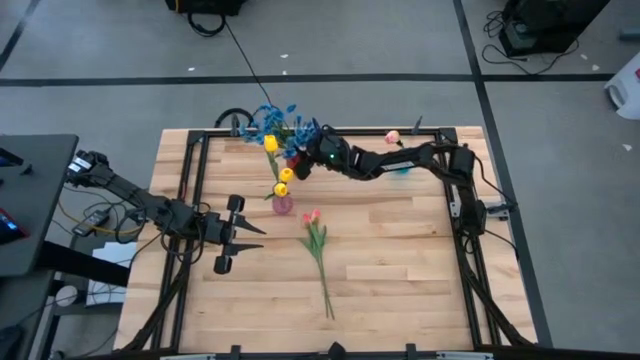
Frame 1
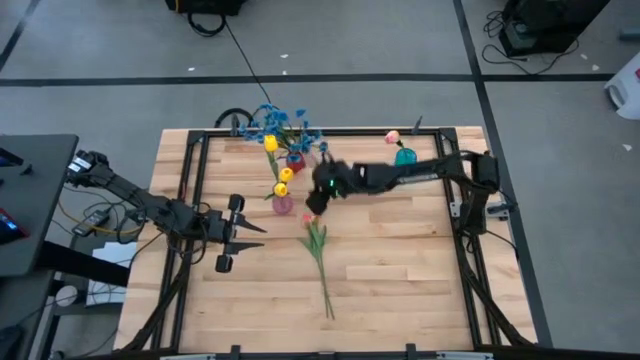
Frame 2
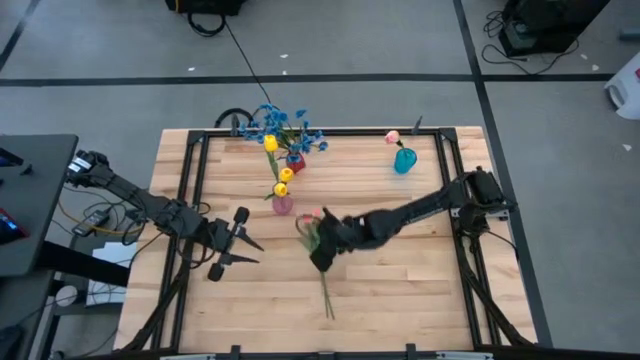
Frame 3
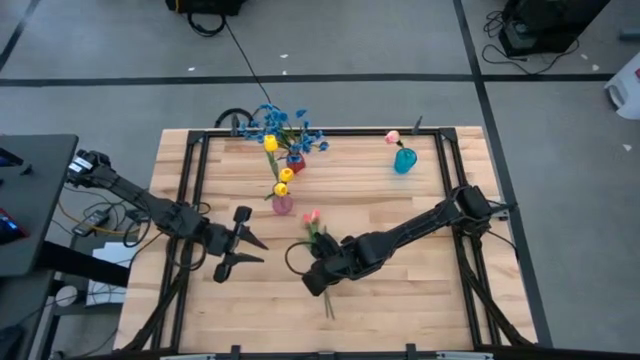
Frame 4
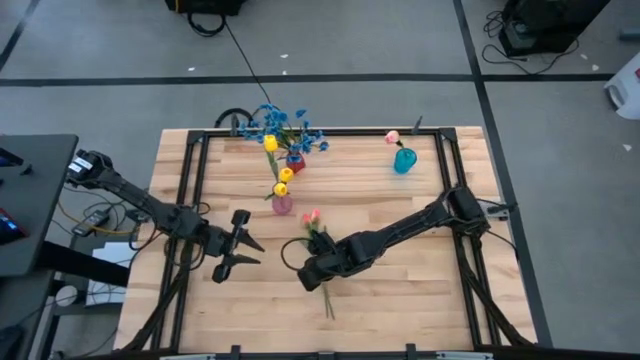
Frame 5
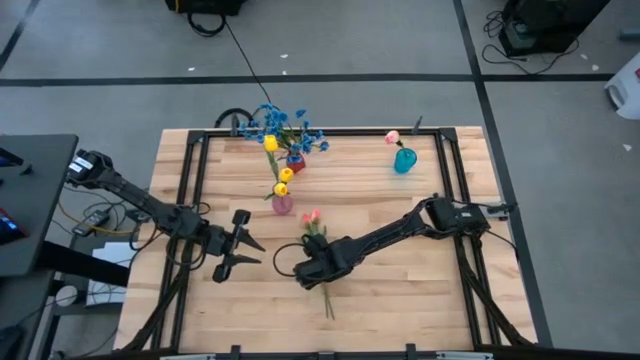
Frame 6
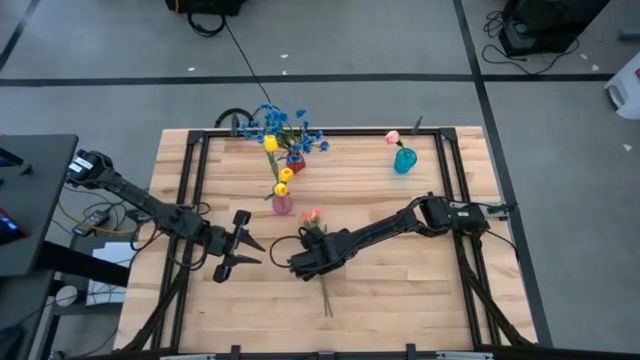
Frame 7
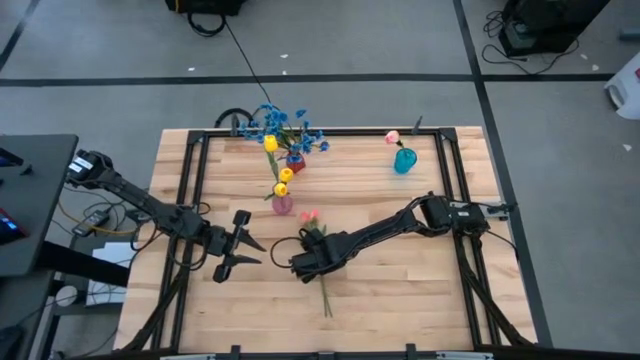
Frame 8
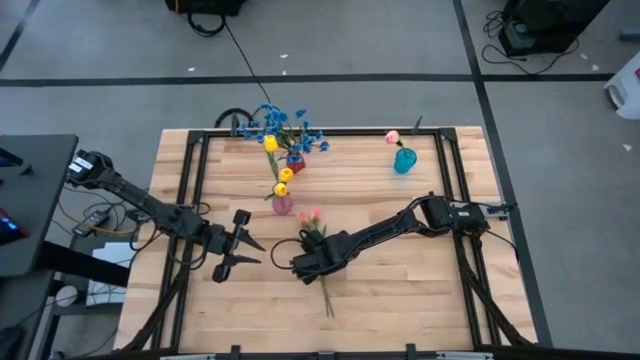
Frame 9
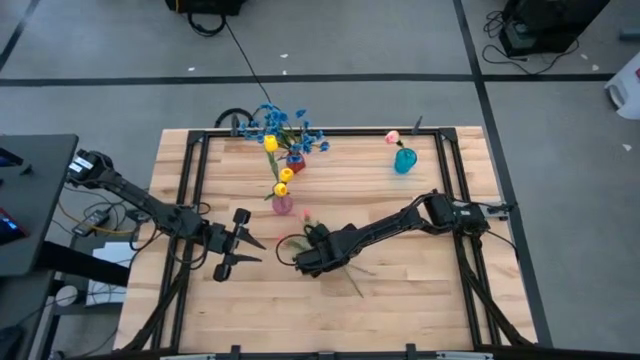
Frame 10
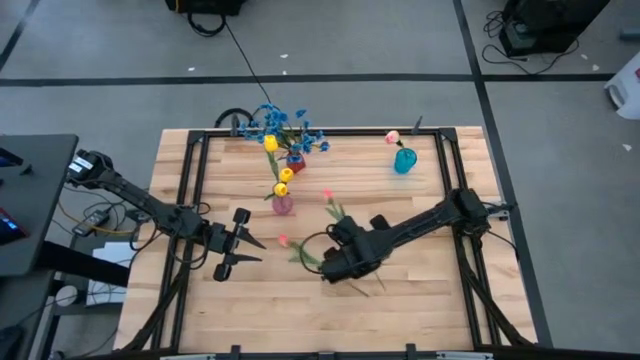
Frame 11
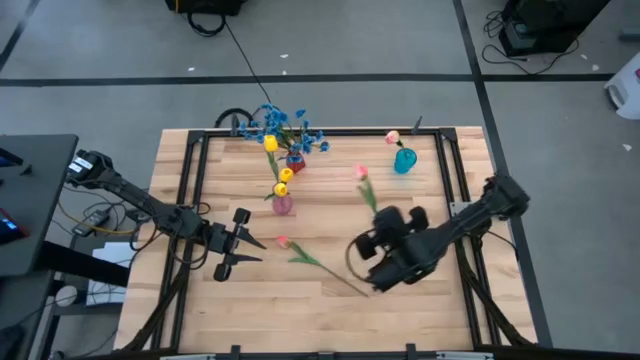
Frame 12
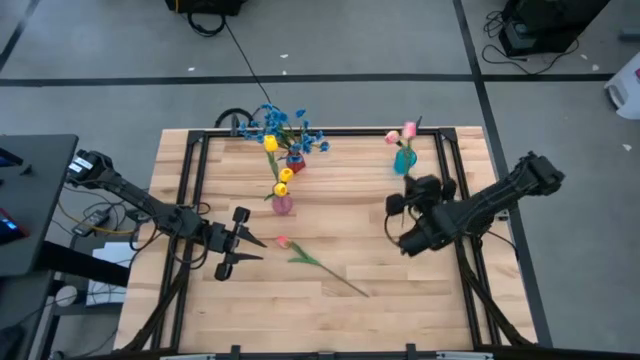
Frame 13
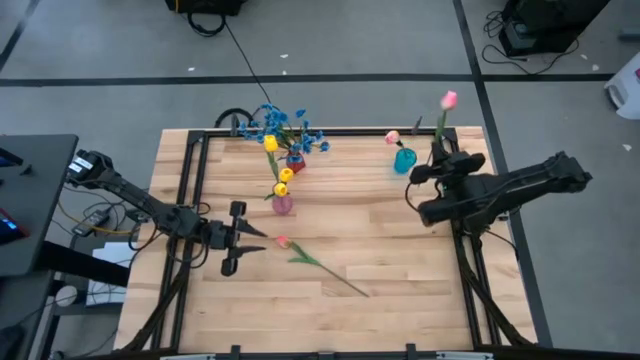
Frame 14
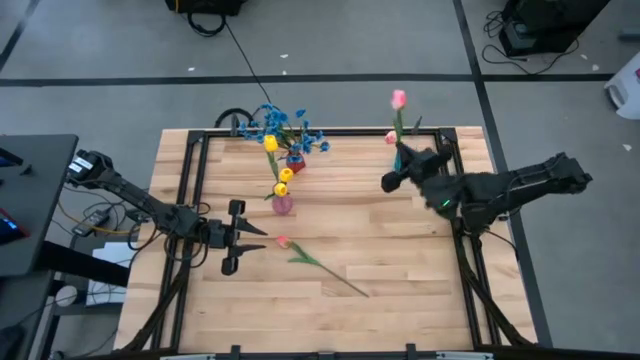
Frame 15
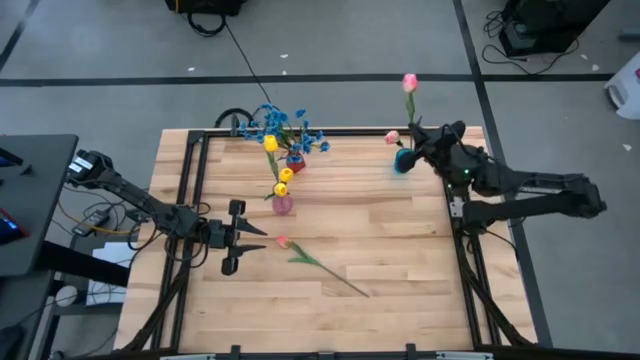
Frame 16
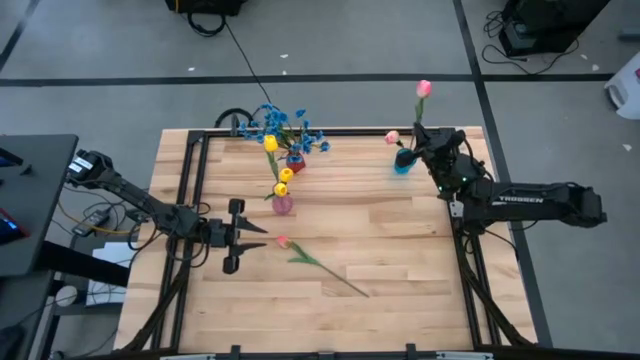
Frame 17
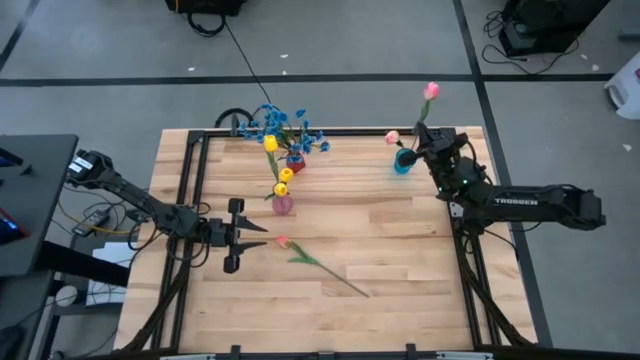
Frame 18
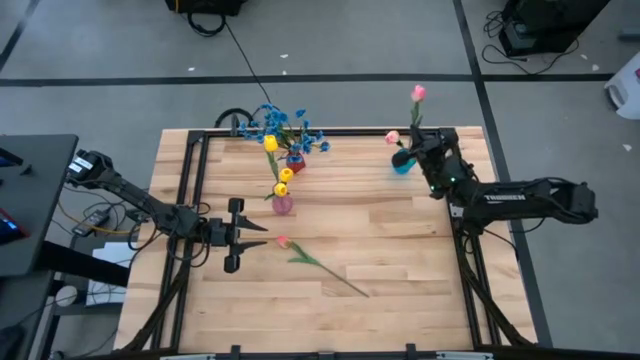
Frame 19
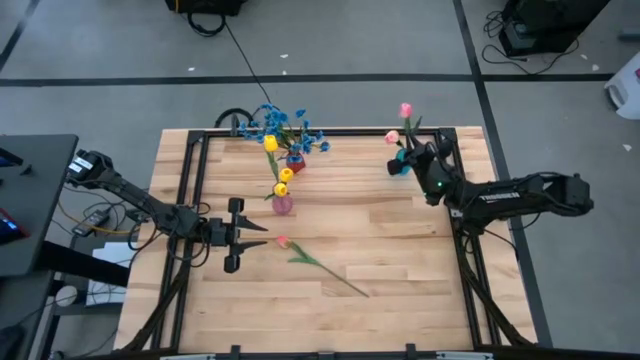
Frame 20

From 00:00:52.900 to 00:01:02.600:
Task: Sort flowers into vase by color
Put the right pink tulip into the blue vase

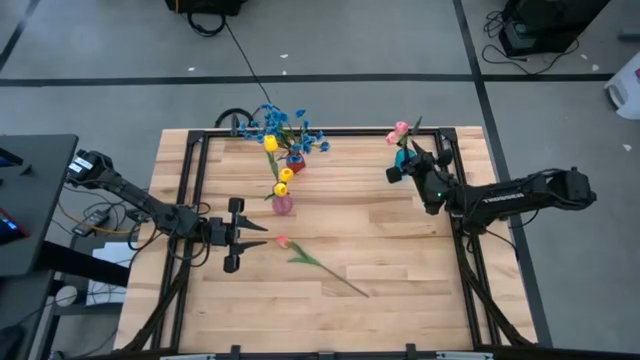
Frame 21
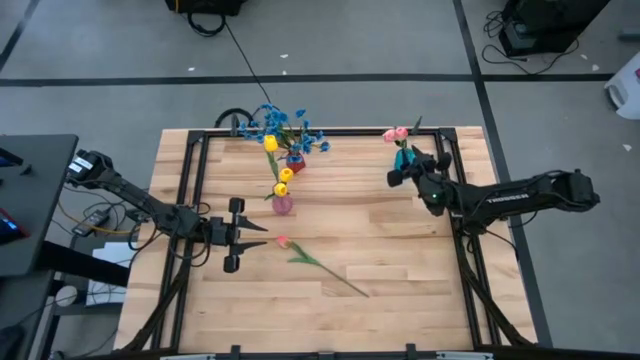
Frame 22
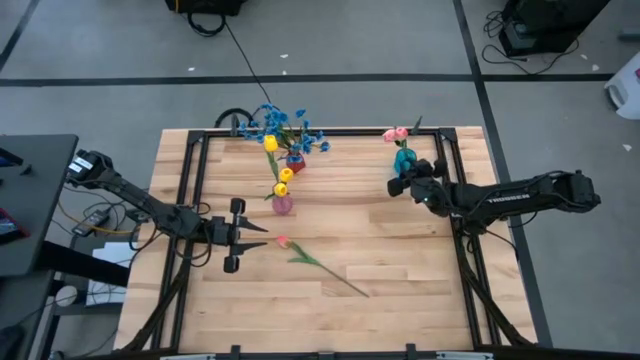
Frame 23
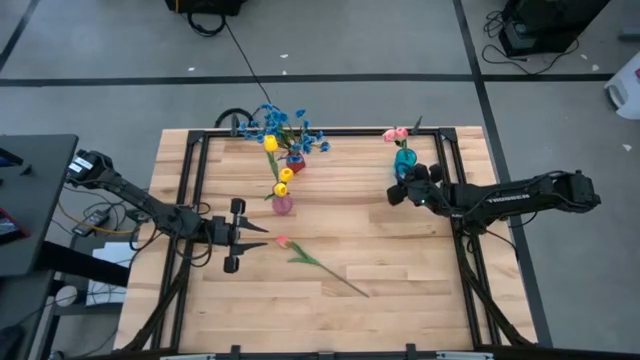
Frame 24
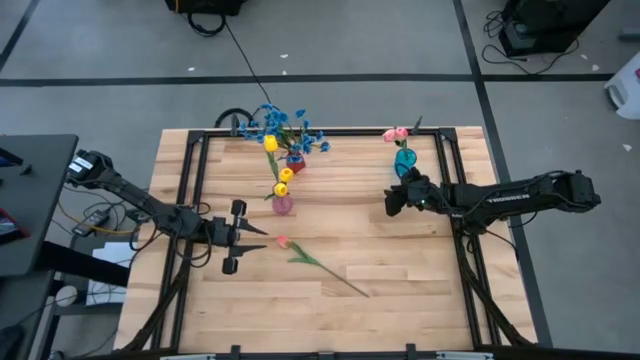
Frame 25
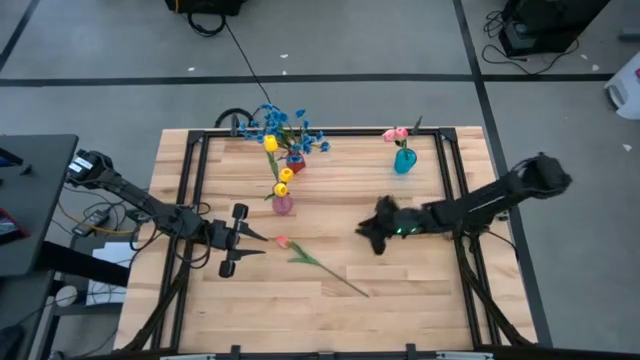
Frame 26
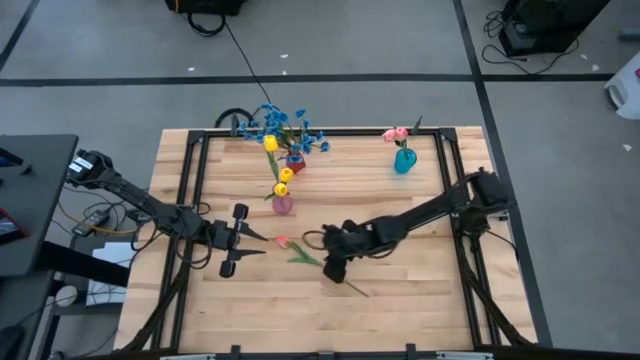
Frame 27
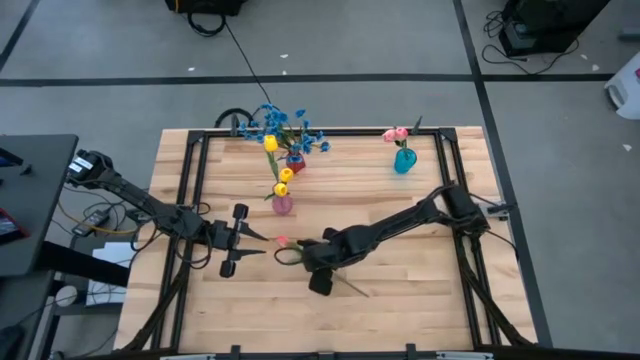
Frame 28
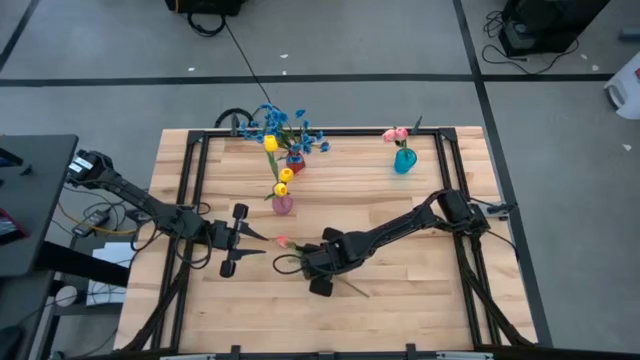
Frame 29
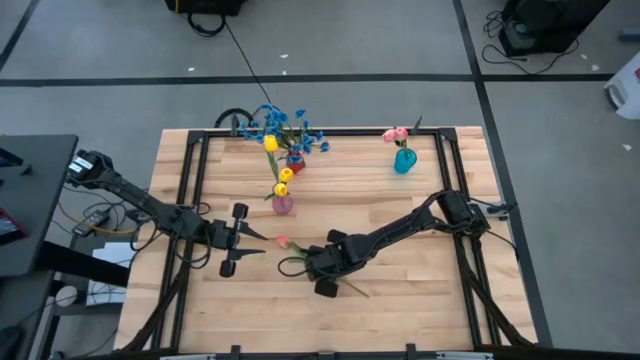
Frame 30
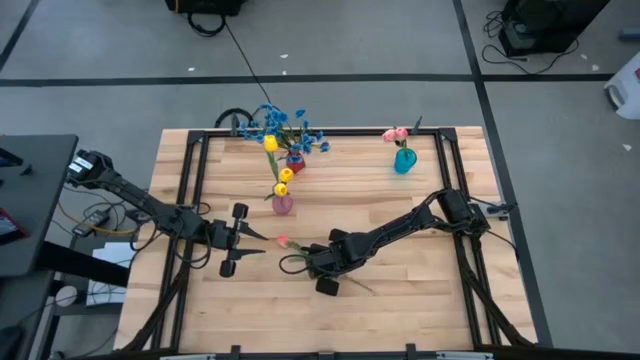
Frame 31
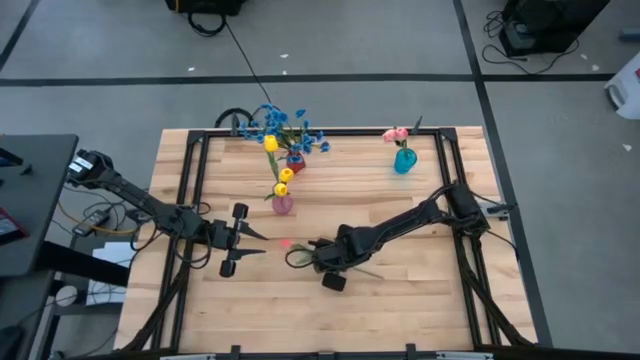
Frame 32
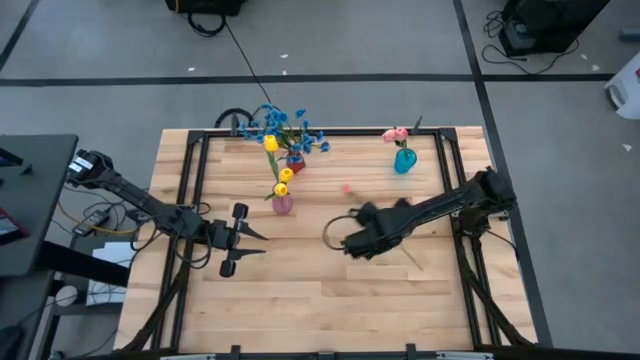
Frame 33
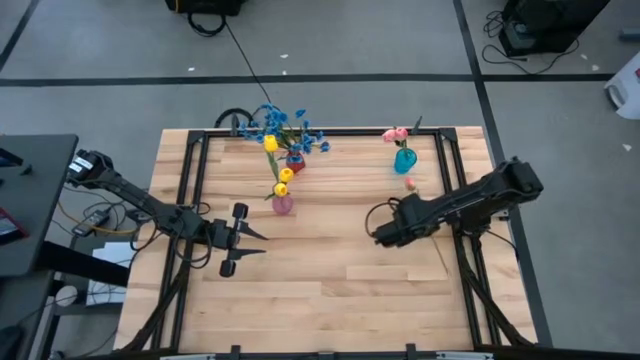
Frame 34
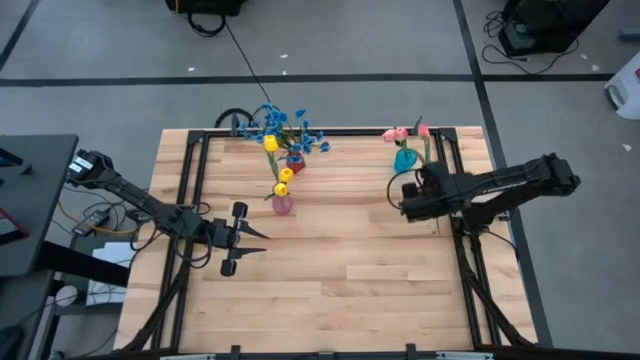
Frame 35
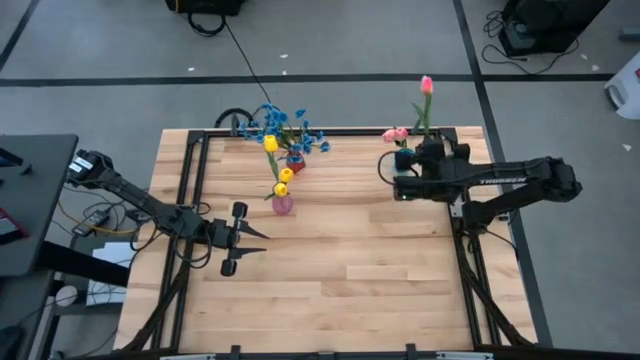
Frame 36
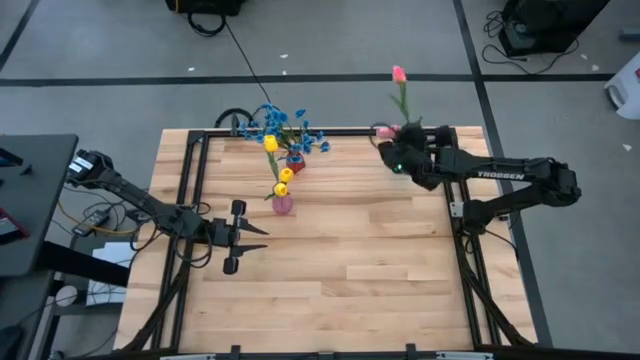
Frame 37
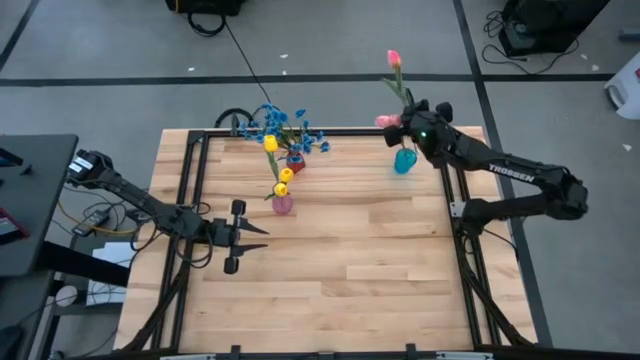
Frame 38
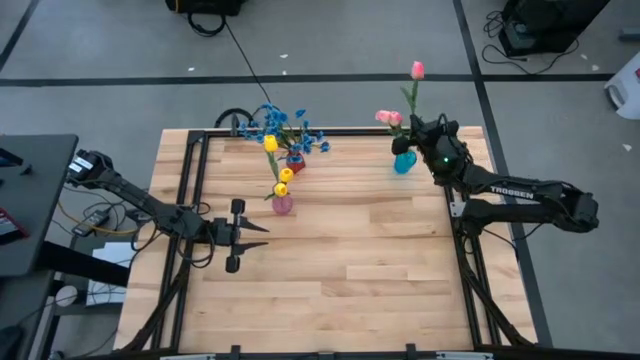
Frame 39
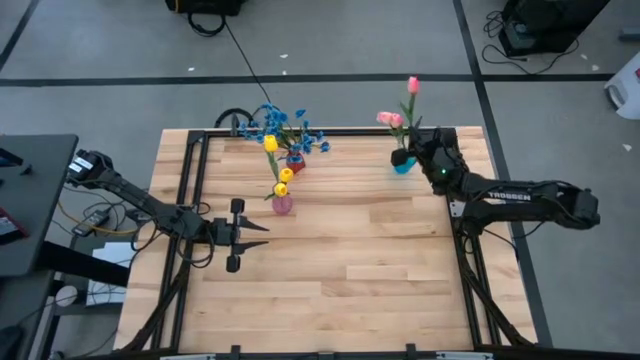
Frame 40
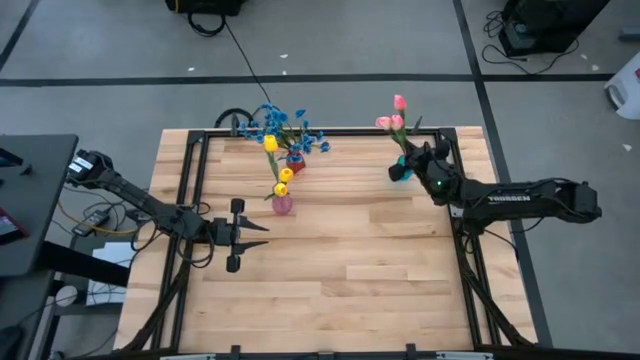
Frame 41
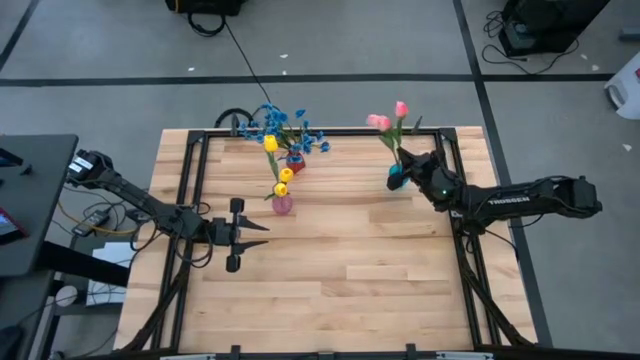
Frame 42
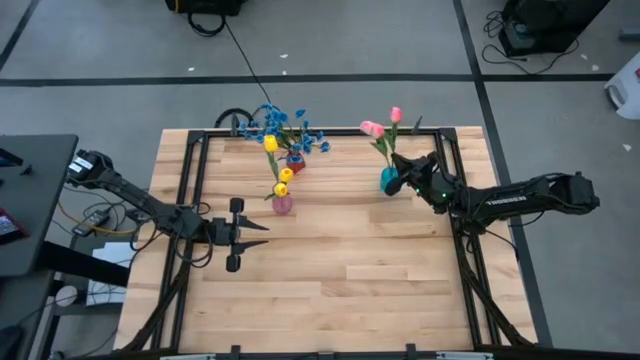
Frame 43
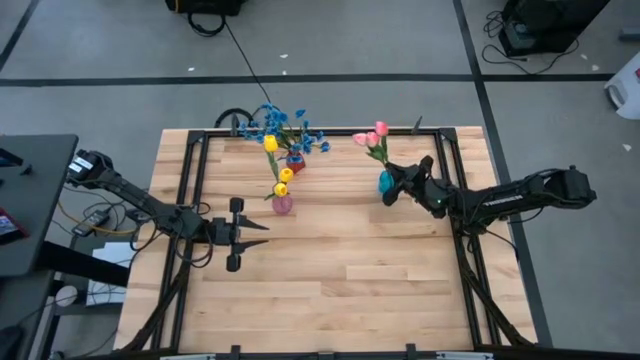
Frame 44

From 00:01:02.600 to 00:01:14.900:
Put the pink tulip into the blue vase
